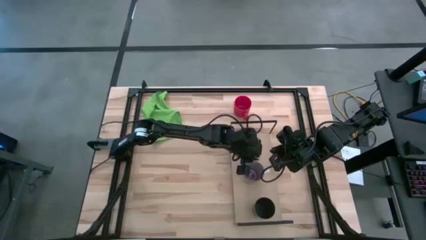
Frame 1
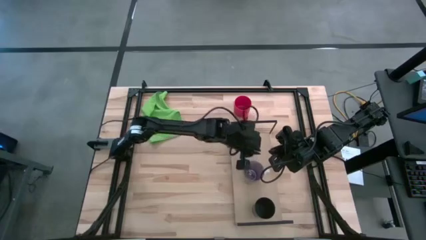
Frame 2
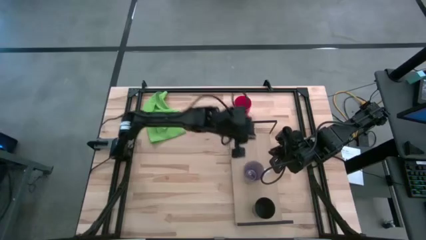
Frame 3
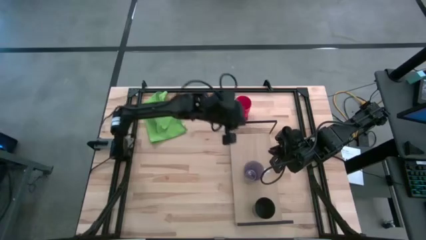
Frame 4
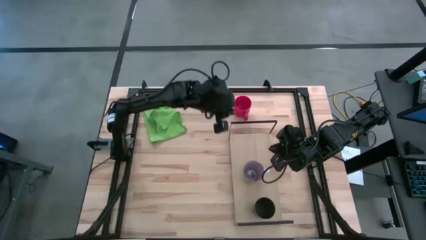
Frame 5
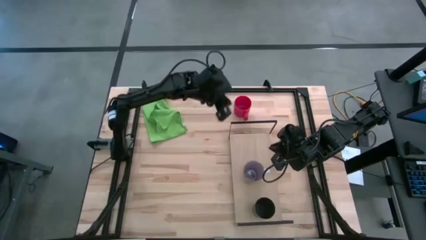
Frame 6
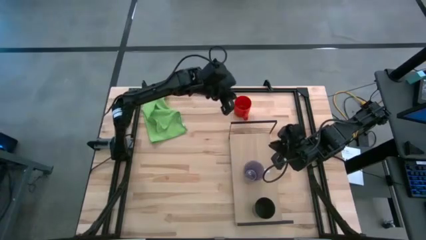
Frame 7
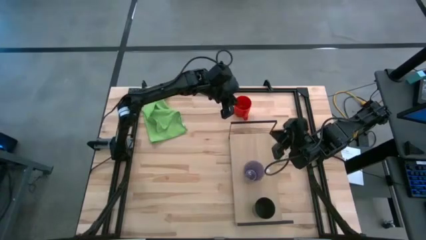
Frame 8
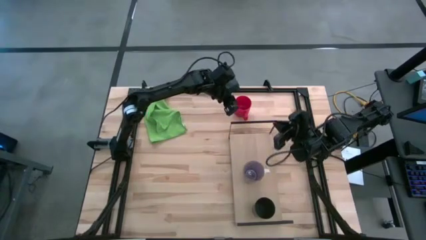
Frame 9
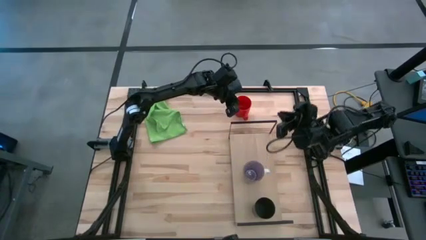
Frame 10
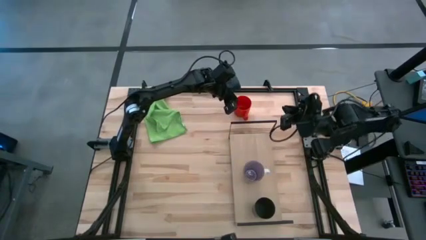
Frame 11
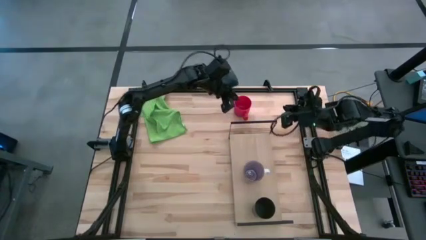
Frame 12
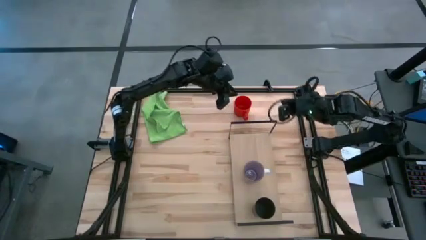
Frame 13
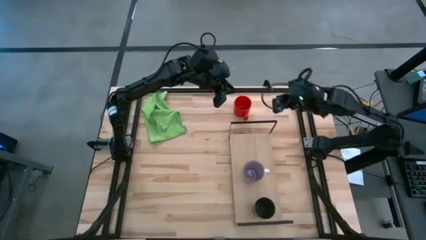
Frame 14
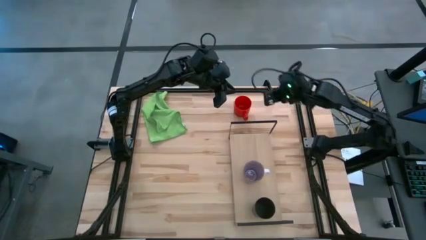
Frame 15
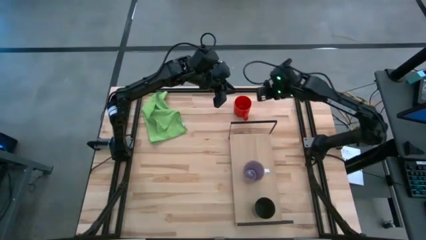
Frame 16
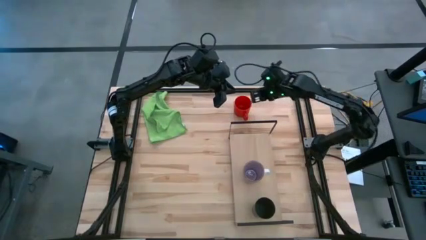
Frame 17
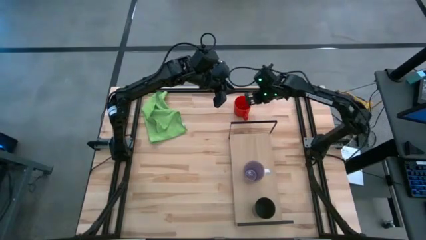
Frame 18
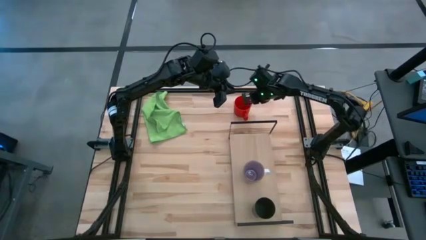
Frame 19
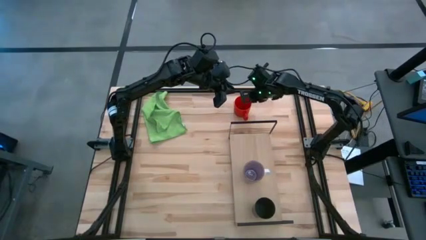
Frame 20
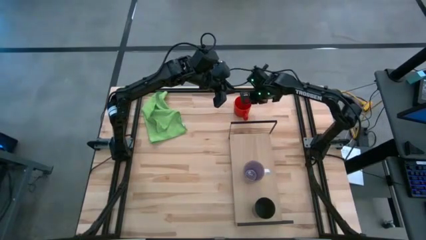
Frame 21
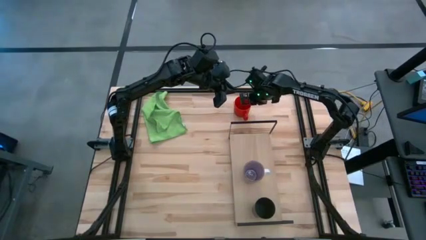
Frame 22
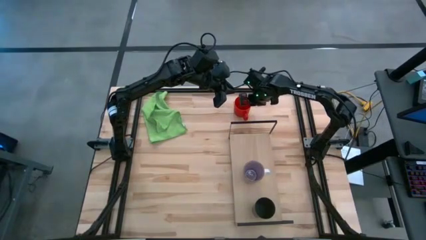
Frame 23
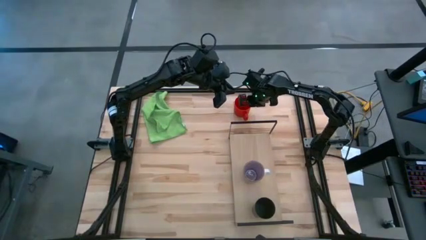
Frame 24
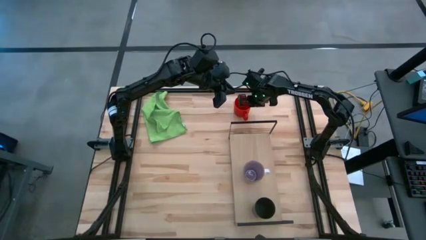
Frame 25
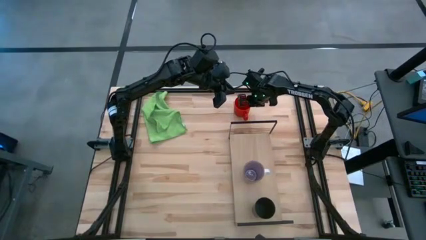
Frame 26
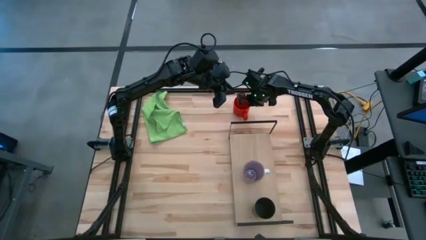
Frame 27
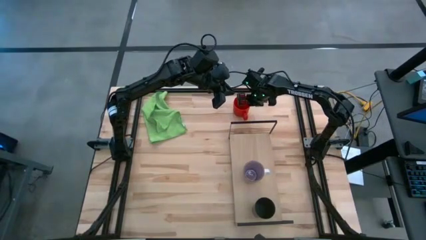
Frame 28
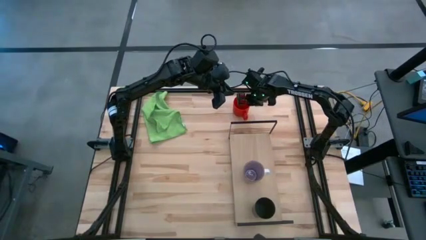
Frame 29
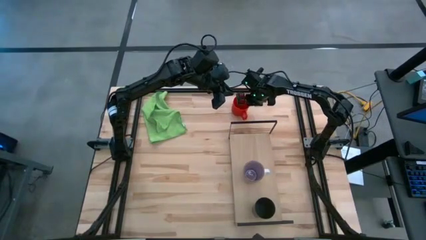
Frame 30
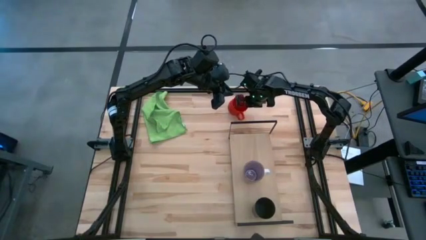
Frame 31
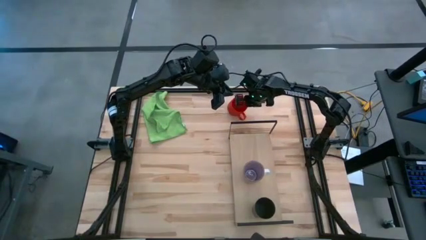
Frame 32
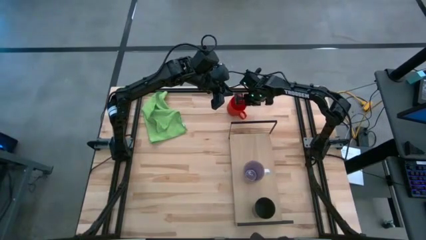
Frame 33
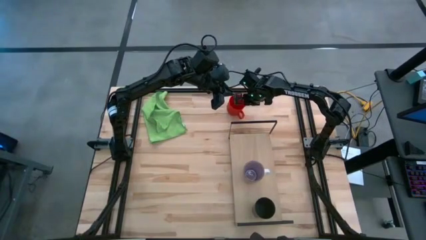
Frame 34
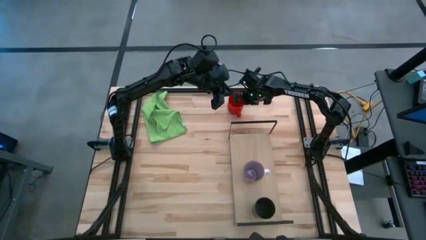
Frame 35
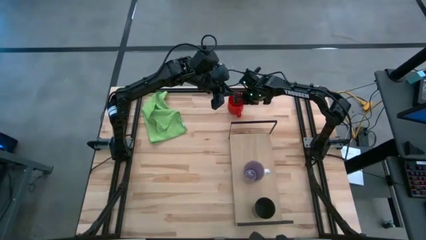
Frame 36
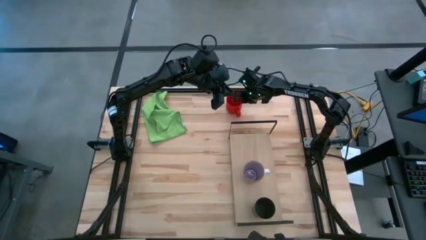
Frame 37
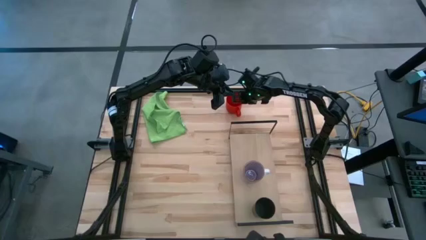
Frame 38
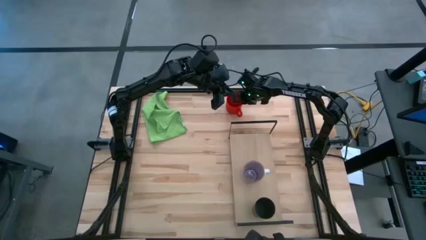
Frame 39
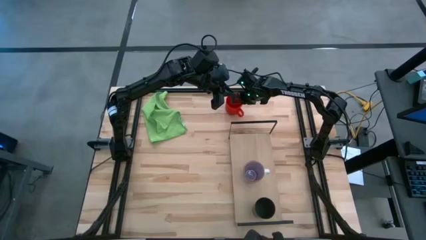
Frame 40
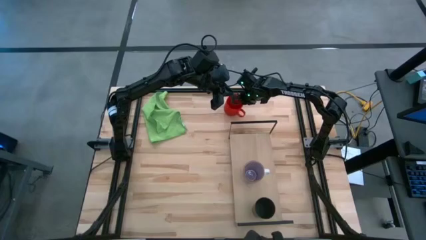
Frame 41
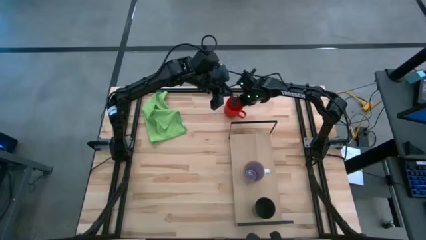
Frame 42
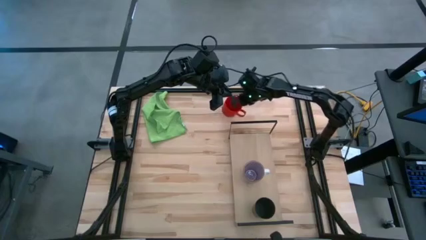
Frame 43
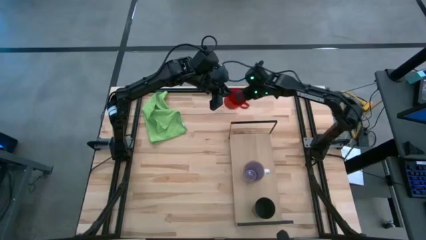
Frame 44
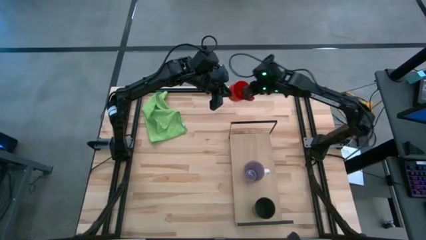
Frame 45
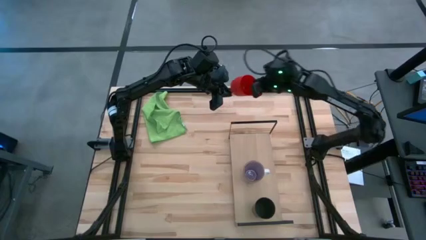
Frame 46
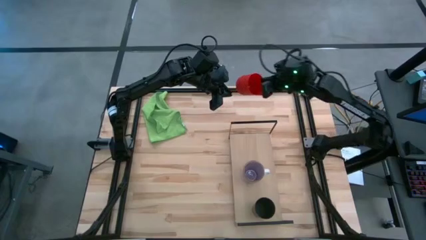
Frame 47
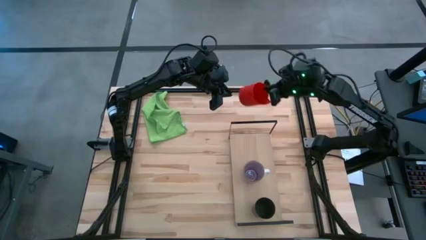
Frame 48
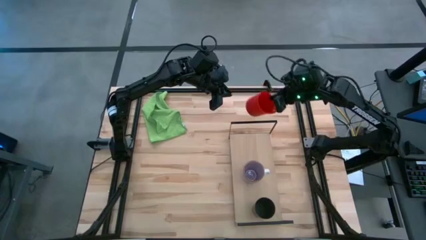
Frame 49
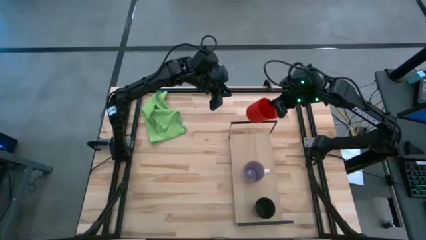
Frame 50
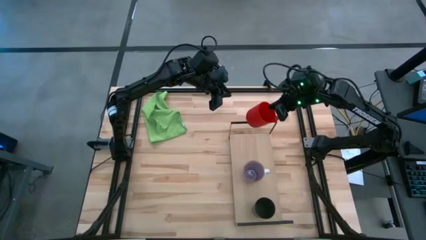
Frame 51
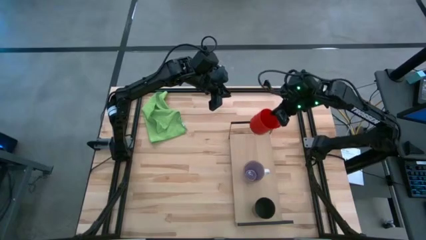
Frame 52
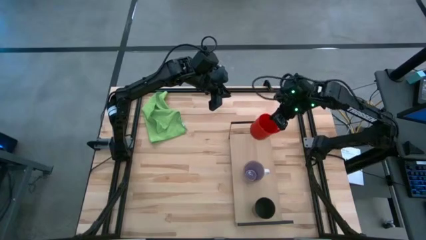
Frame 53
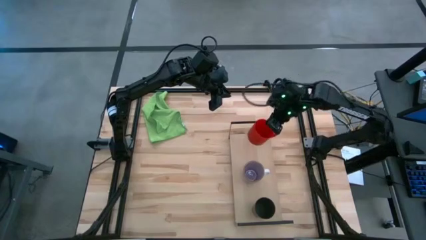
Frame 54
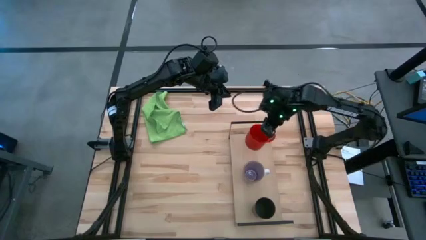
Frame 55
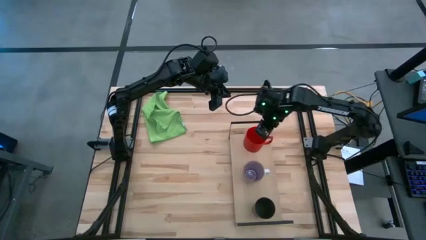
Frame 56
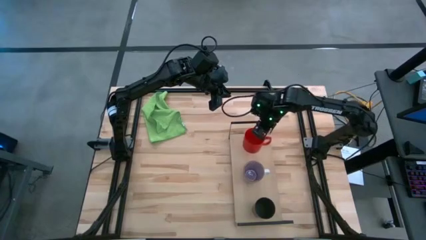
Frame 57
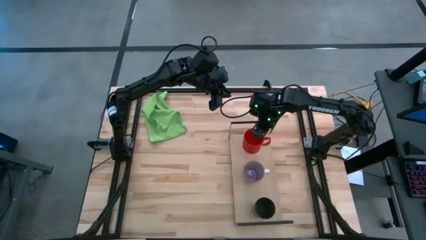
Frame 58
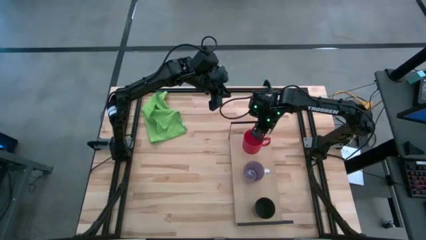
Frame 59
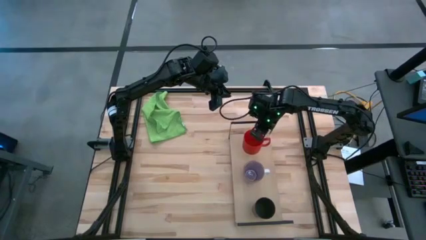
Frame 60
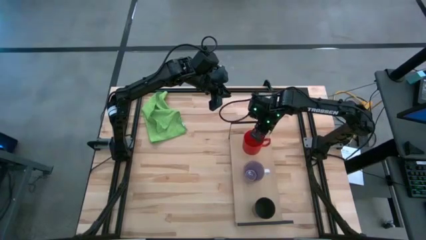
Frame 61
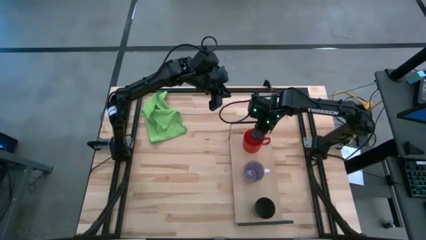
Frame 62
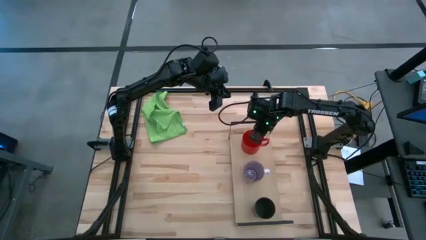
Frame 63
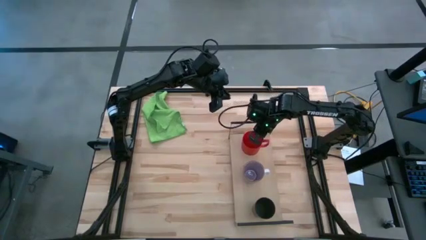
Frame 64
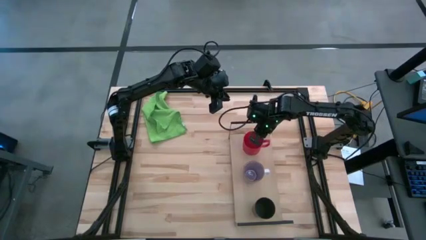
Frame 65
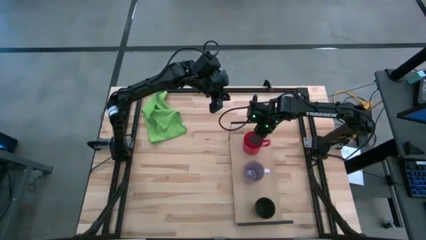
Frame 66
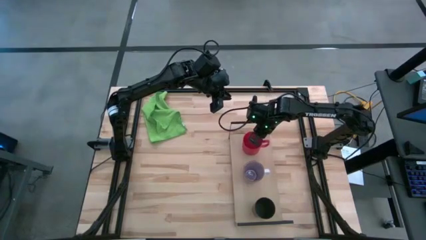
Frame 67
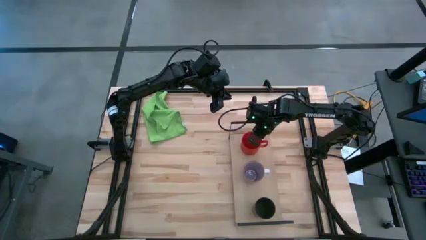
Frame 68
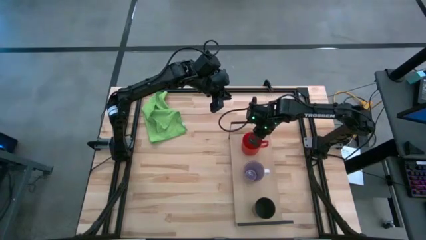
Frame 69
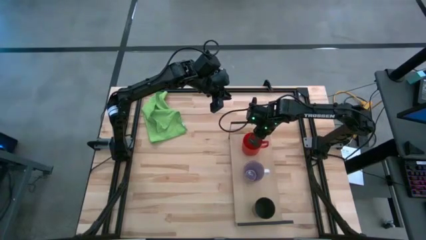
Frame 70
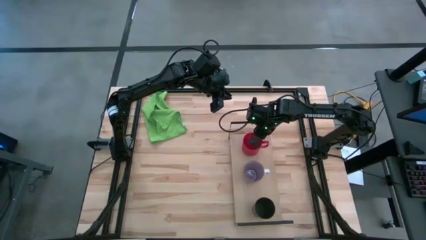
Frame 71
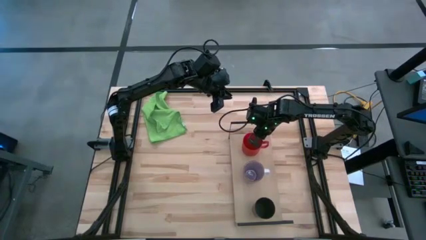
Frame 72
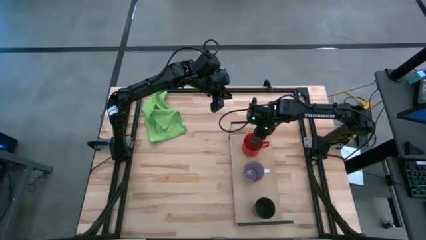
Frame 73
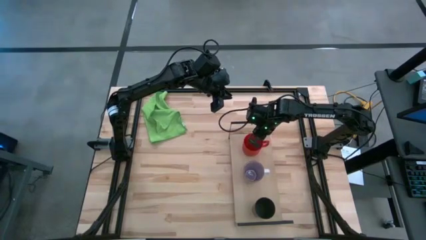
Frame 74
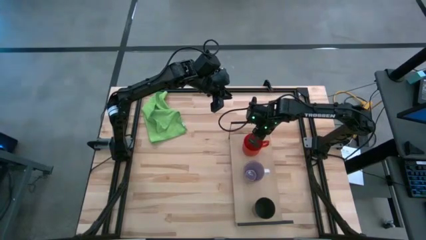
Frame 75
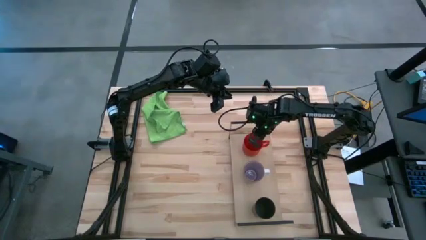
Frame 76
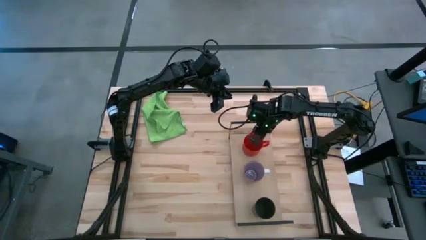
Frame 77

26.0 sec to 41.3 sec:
Task: Stack small to large cups/mugs on shelf
Put the red mug on the shelf
